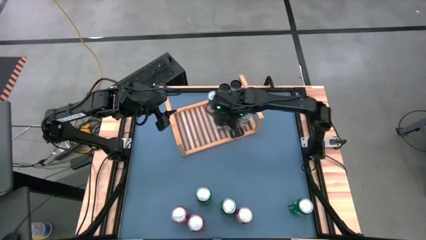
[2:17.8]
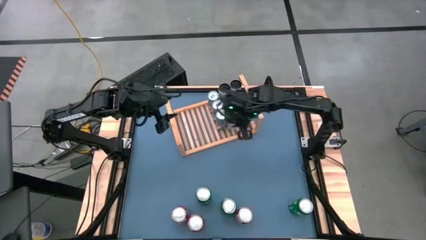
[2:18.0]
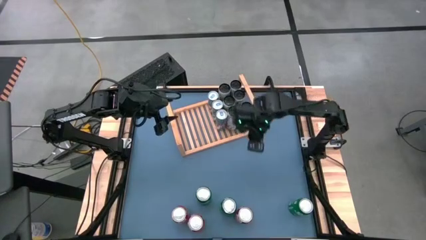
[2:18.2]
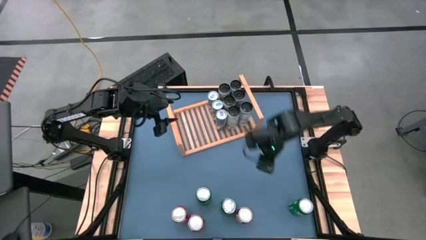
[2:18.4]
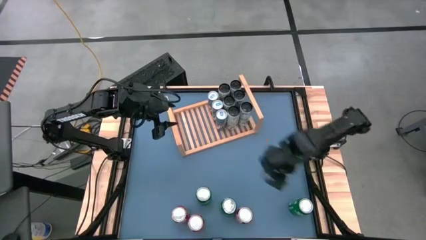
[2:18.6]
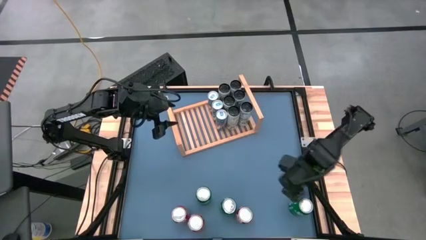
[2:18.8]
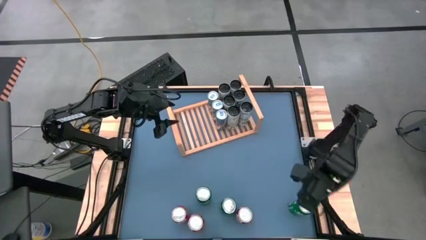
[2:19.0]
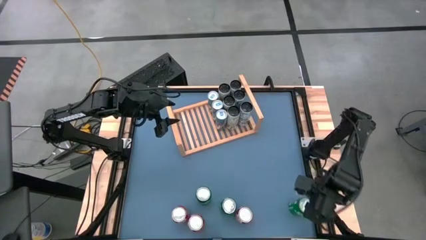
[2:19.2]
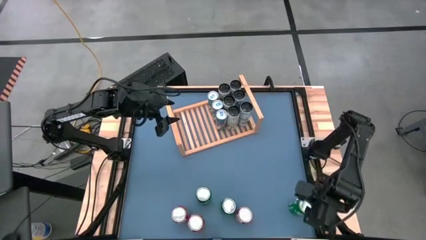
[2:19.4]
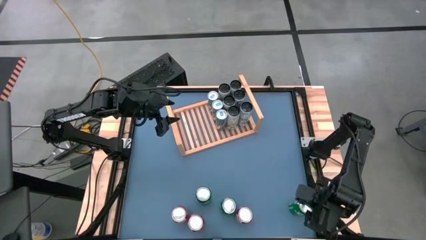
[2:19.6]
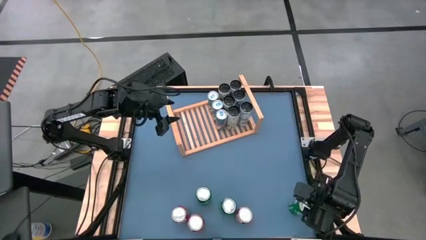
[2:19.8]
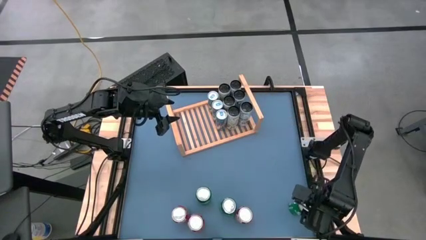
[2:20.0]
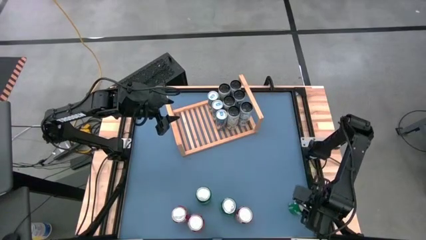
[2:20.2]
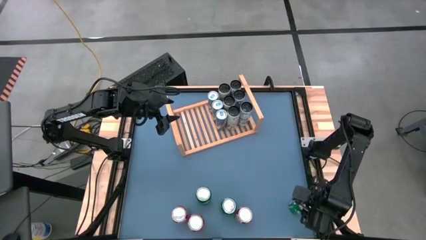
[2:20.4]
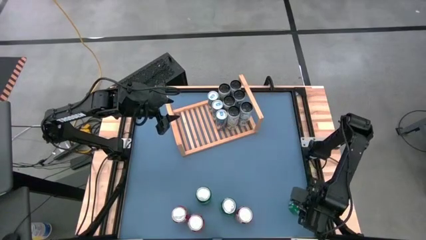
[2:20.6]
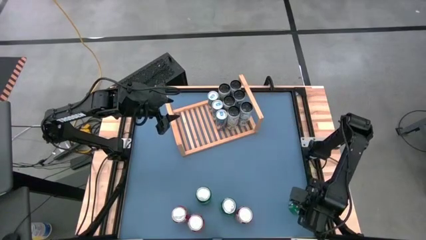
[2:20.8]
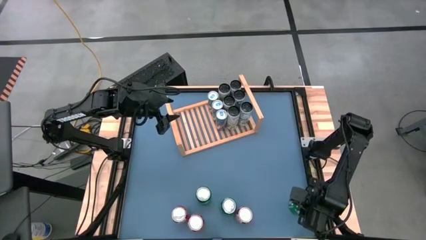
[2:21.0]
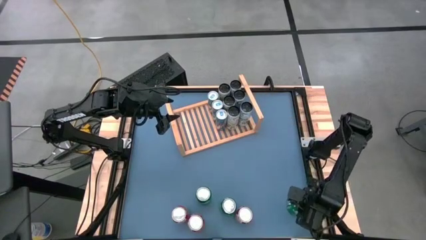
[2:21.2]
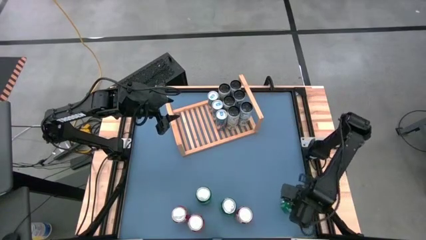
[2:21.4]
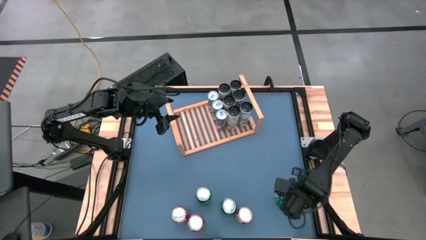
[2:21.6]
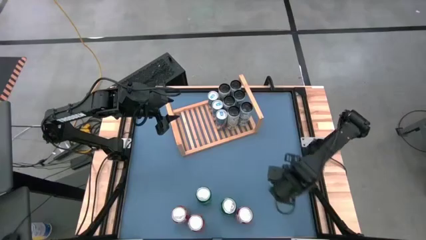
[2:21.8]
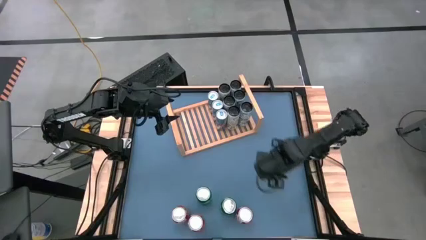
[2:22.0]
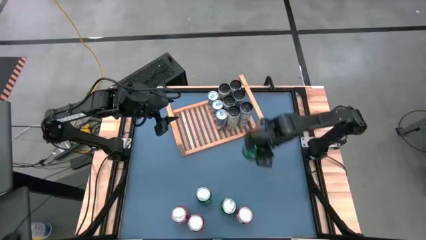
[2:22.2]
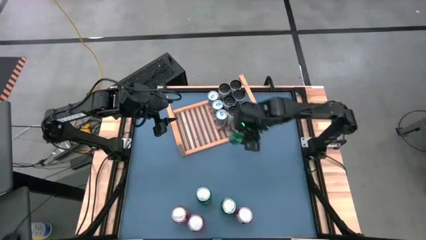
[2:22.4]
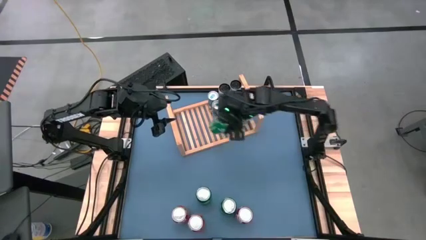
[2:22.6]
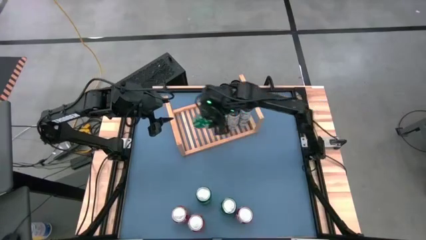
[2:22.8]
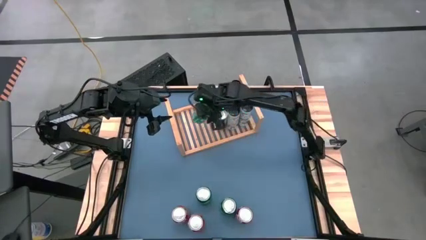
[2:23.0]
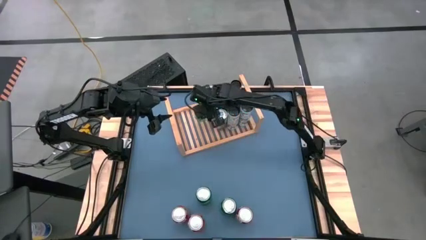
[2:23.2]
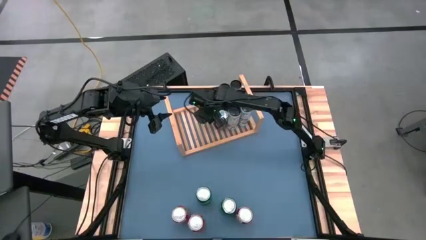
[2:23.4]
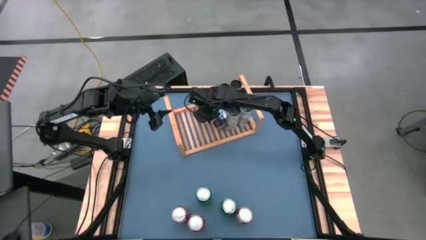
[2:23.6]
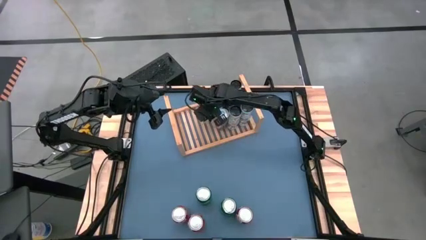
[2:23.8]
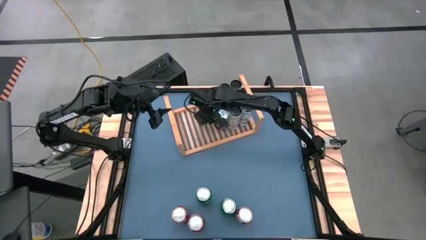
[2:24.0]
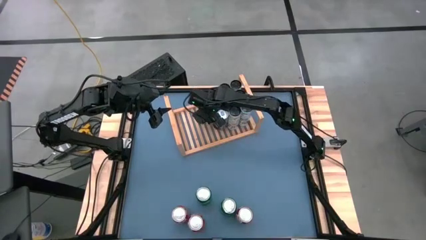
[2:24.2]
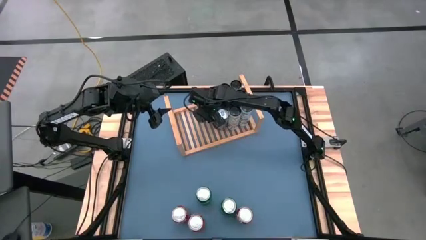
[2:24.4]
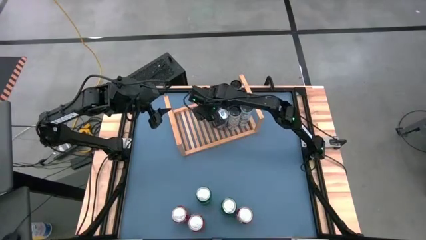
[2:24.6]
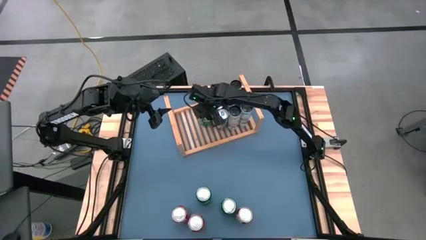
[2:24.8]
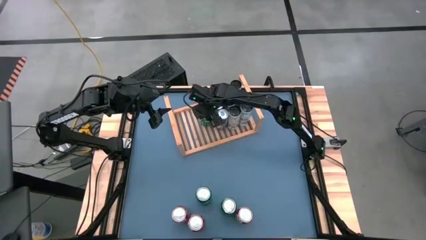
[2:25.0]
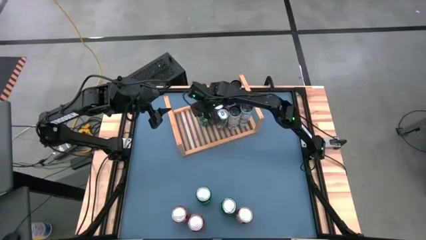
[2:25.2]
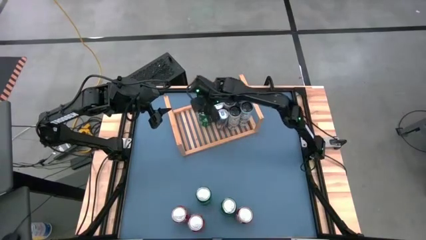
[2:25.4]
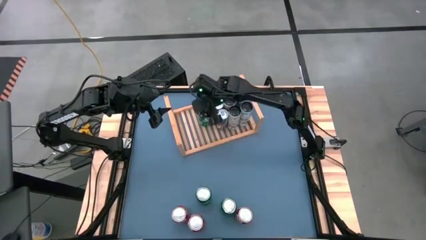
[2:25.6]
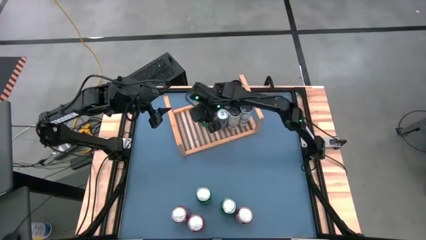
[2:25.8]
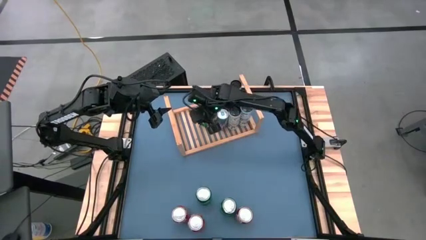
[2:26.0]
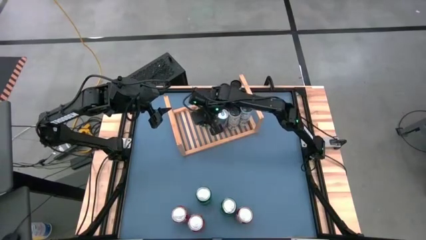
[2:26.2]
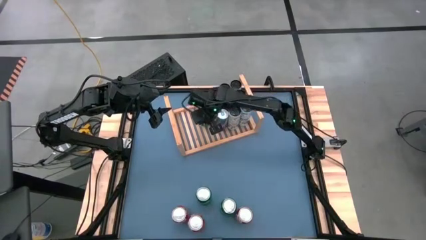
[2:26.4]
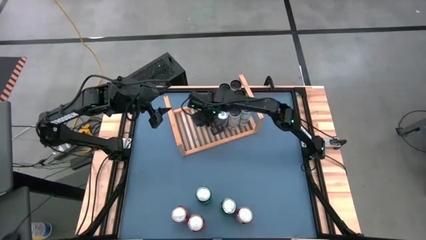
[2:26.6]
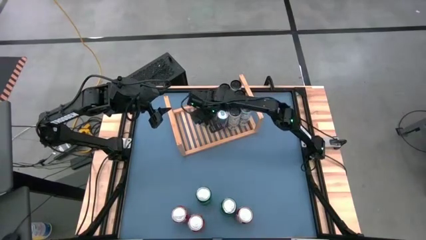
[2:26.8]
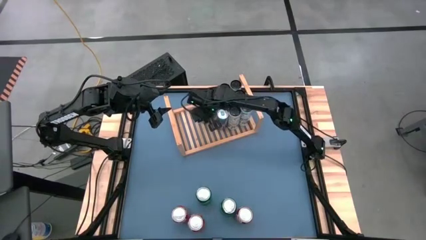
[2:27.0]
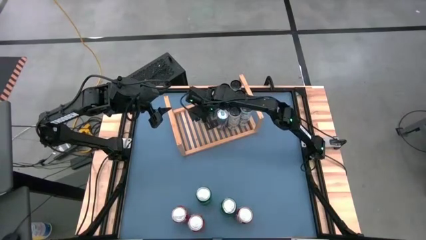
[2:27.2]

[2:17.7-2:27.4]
Task: Place canned beverage on shelf
Put the green soda can on the shelf

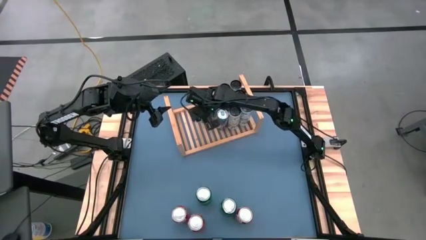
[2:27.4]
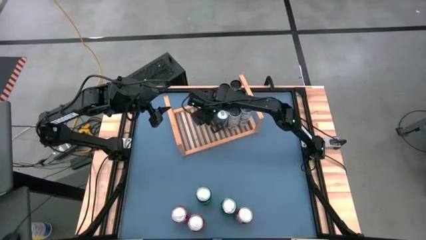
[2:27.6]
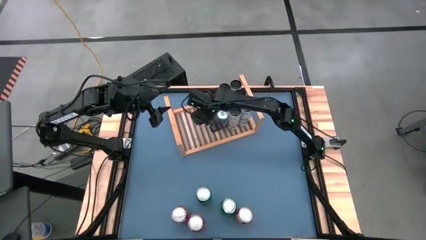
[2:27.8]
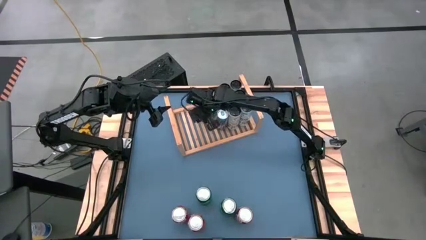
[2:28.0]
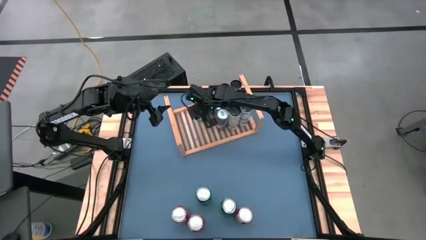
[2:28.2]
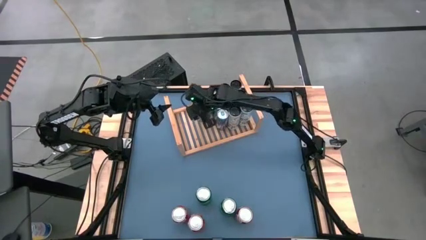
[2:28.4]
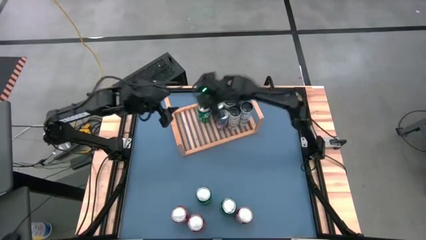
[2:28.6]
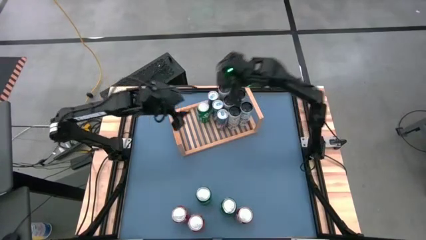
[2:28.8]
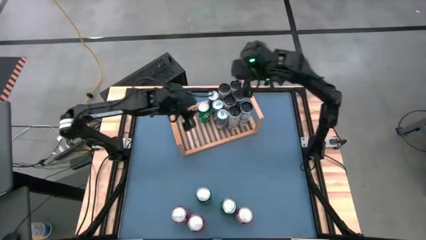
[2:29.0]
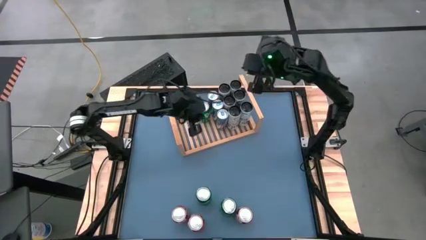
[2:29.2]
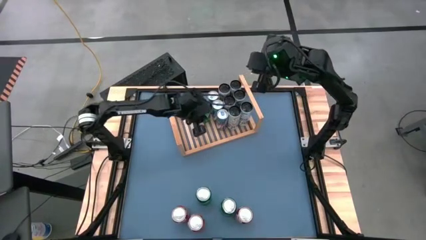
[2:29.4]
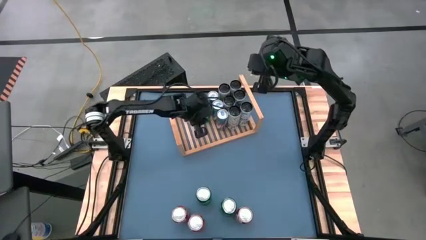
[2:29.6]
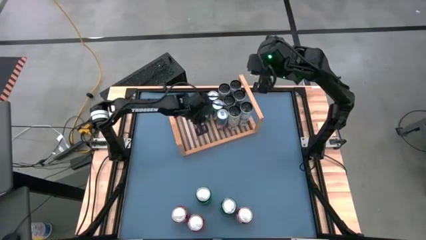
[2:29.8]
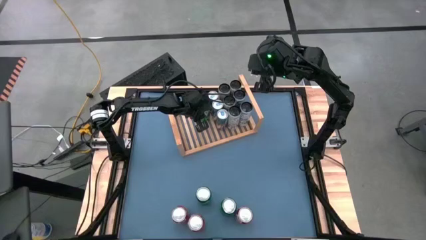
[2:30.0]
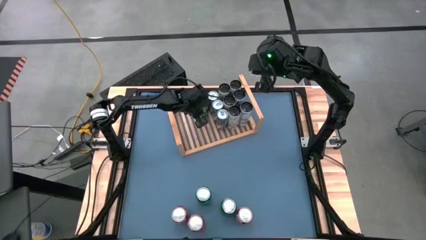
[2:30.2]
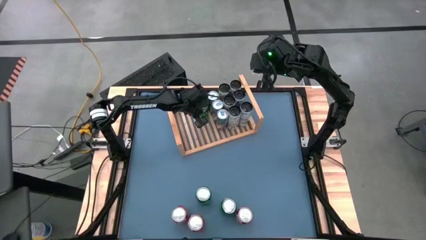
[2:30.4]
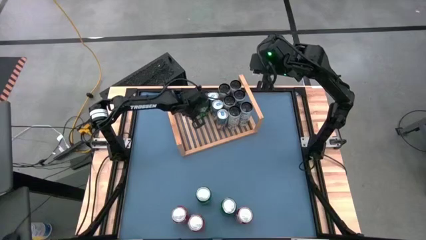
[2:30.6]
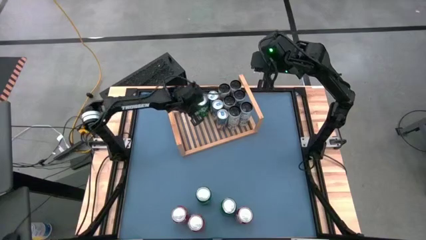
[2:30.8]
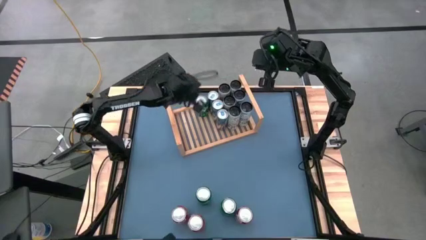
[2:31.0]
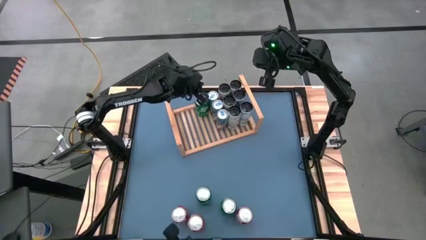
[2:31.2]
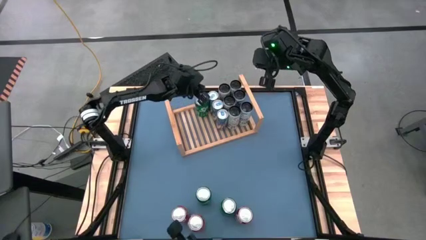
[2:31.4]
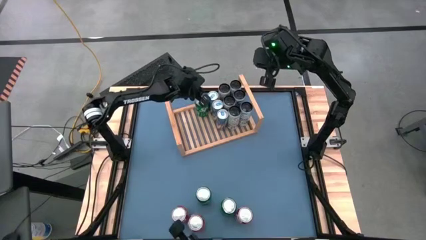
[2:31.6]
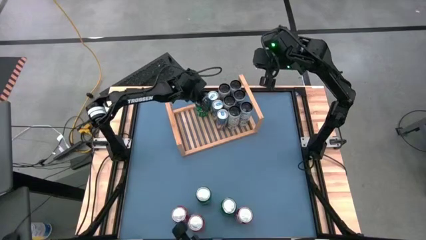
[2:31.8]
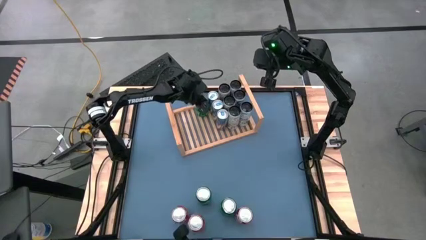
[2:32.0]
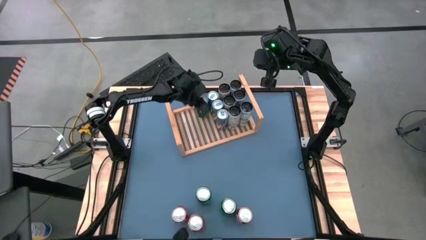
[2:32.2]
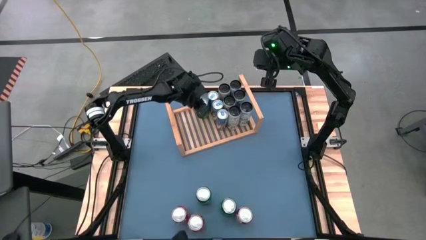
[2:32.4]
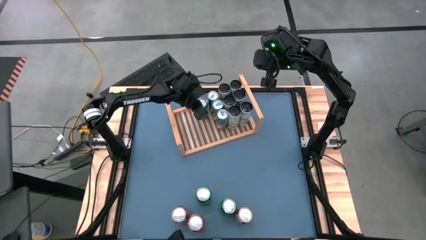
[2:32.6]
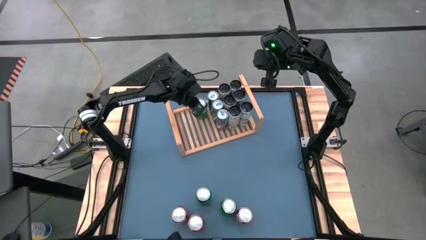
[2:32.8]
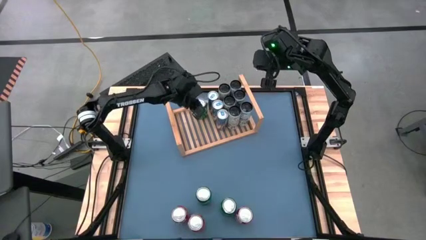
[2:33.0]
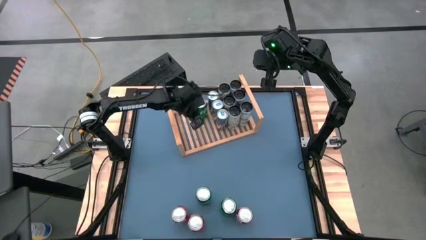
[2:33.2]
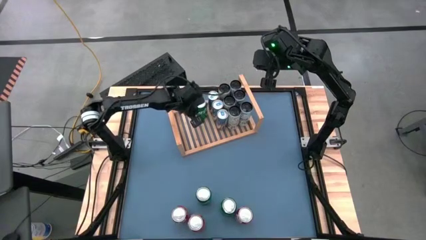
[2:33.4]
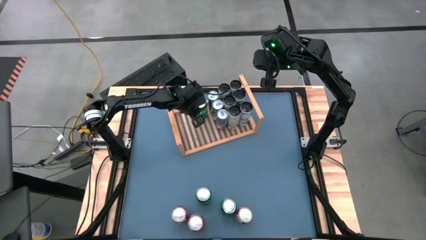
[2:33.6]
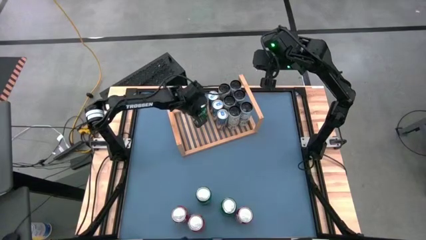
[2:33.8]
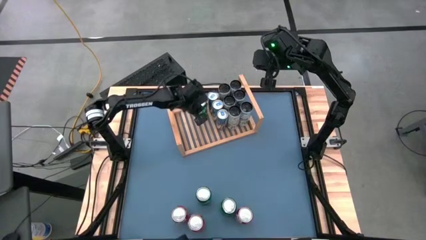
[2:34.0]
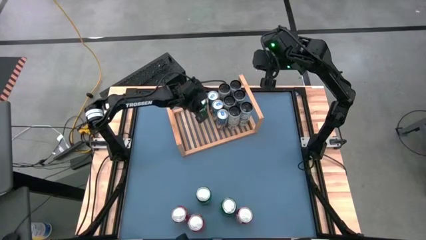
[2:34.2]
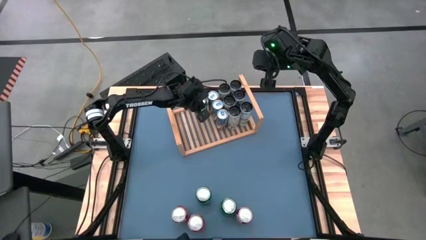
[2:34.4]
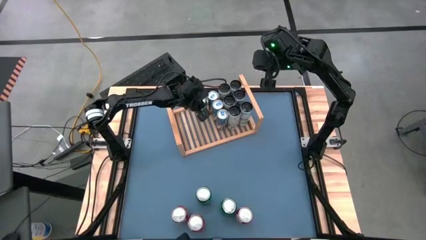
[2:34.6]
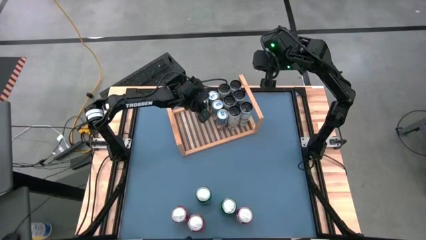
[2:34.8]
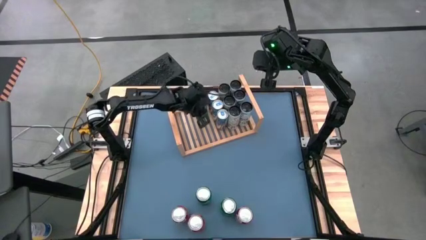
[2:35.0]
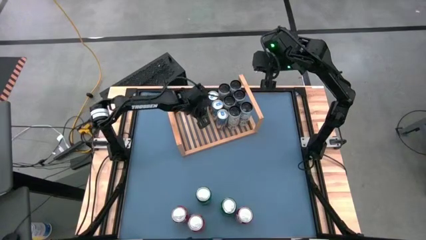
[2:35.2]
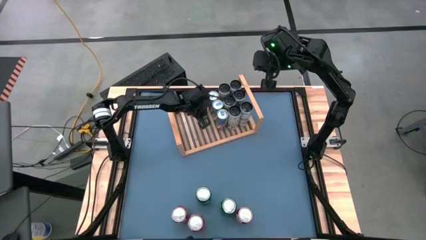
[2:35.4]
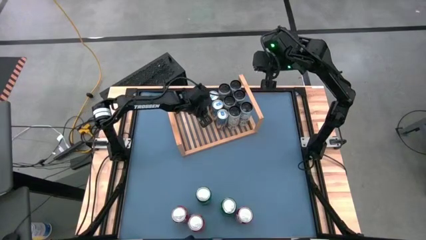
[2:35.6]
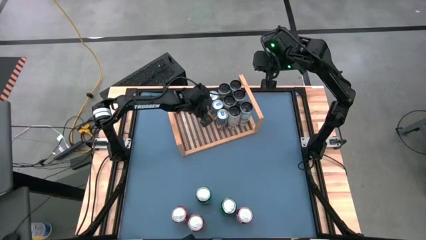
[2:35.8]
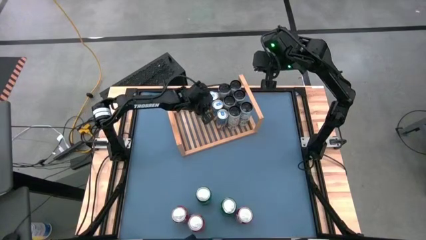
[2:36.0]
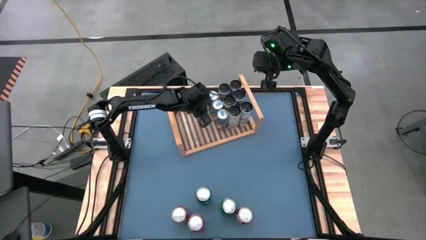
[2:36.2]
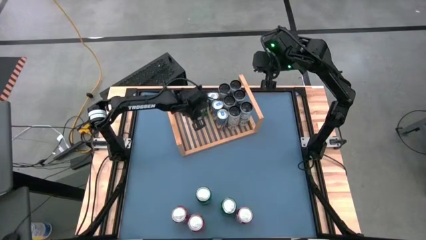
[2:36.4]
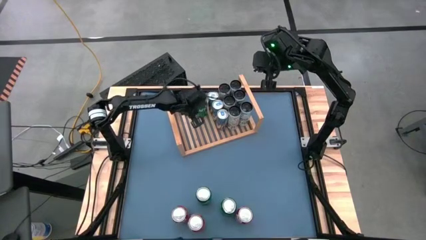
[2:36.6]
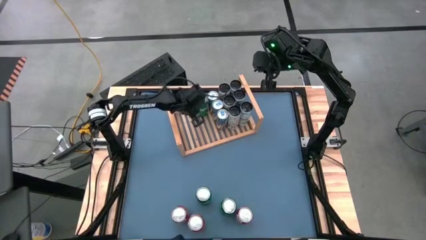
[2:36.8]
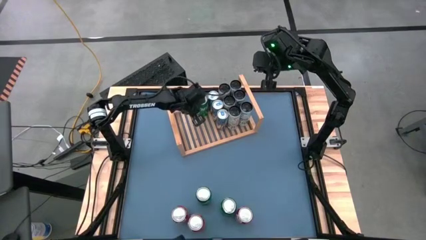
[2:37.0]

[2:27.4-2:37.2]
Put the green soda can on the shelf
